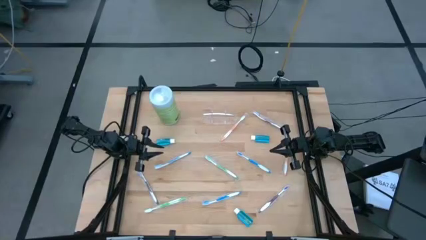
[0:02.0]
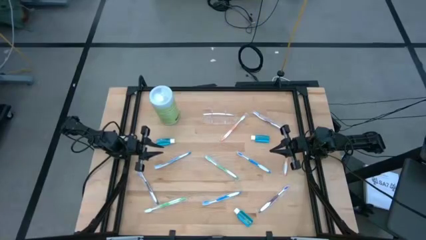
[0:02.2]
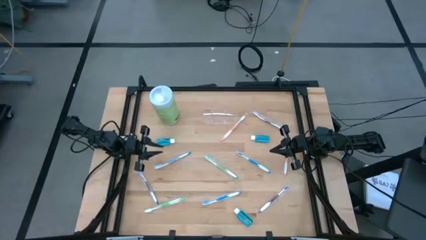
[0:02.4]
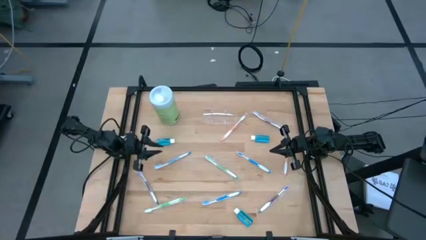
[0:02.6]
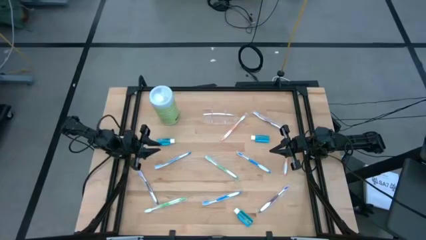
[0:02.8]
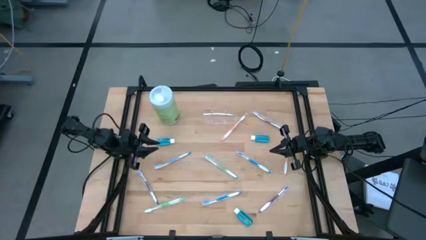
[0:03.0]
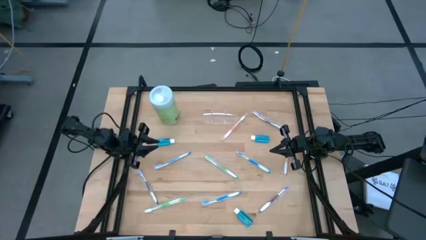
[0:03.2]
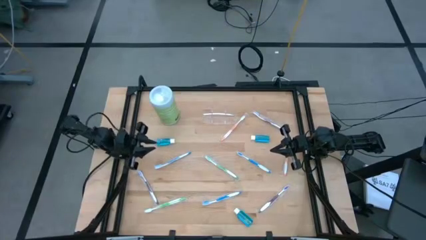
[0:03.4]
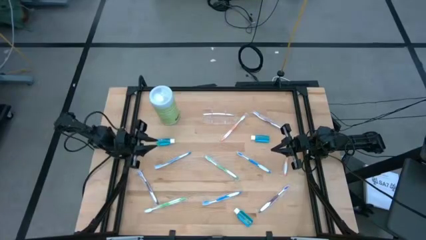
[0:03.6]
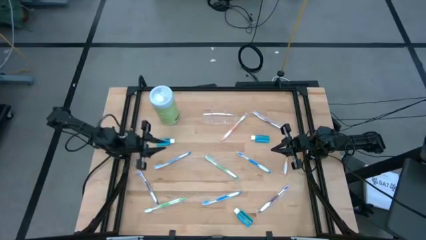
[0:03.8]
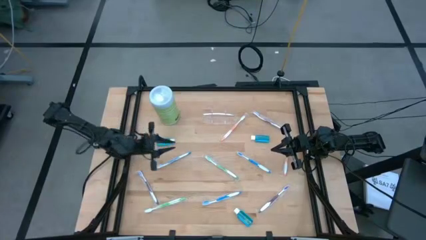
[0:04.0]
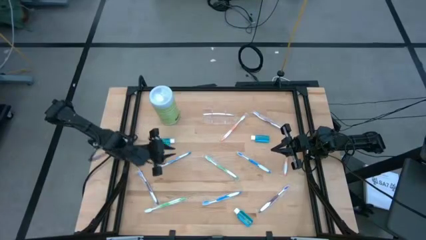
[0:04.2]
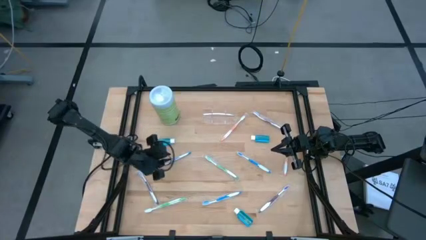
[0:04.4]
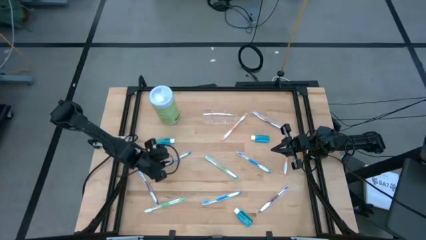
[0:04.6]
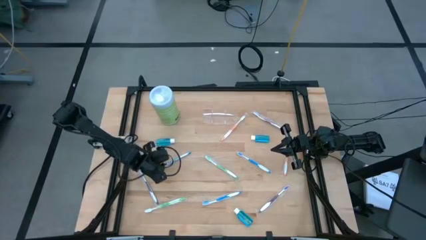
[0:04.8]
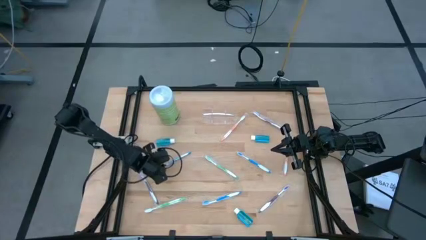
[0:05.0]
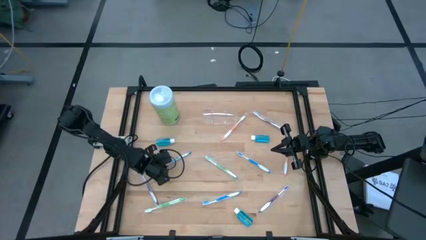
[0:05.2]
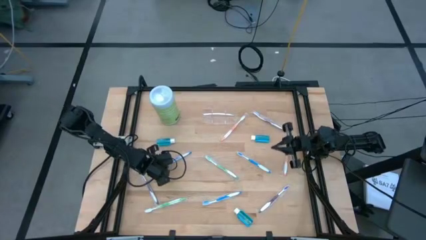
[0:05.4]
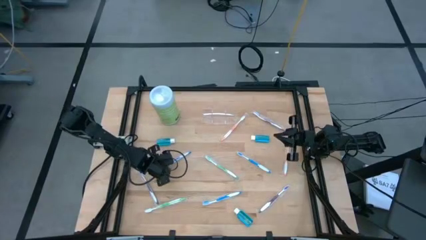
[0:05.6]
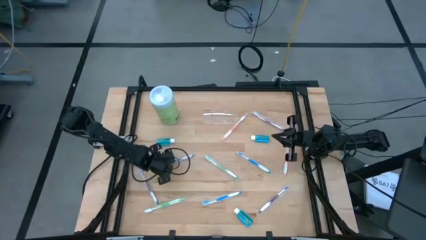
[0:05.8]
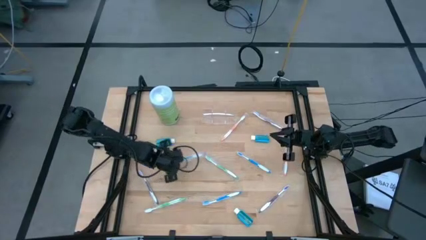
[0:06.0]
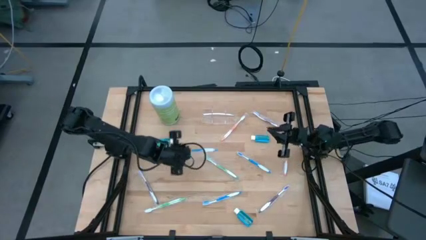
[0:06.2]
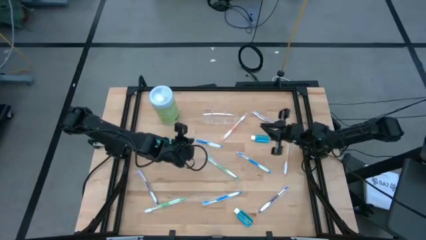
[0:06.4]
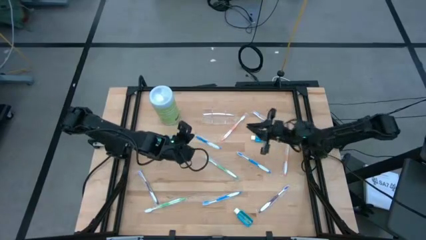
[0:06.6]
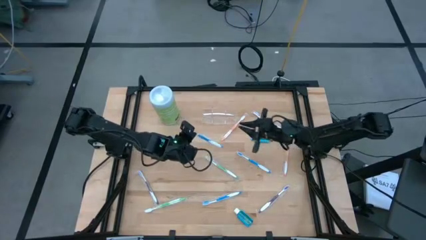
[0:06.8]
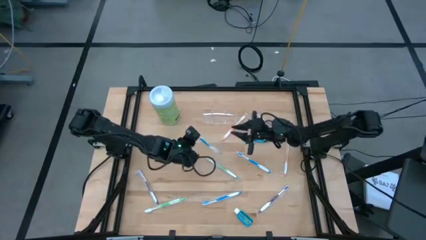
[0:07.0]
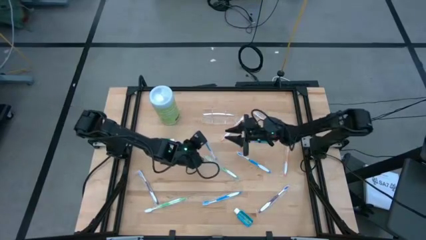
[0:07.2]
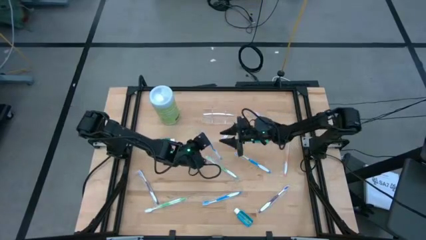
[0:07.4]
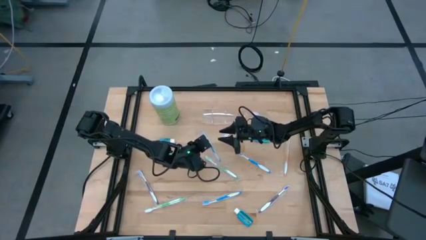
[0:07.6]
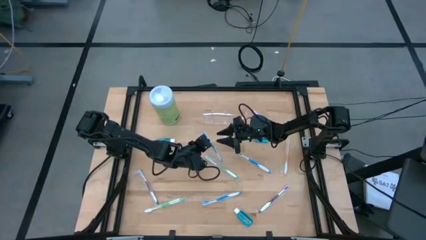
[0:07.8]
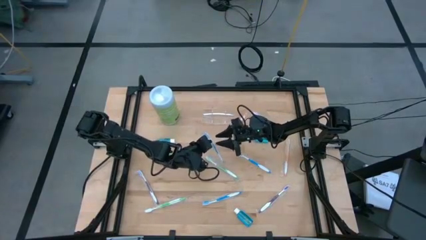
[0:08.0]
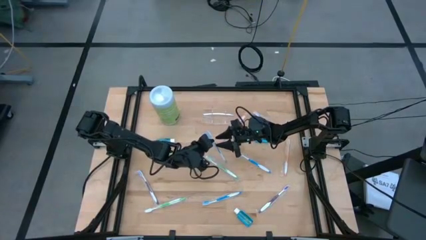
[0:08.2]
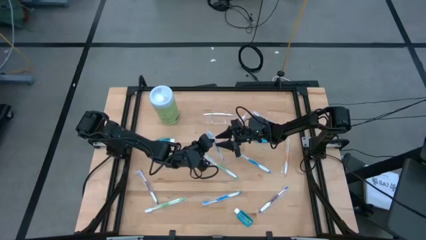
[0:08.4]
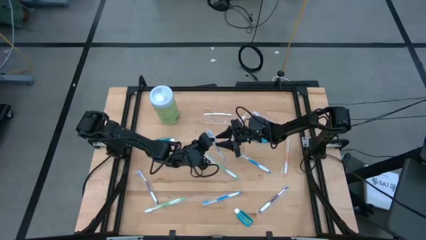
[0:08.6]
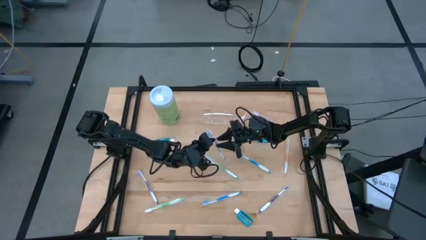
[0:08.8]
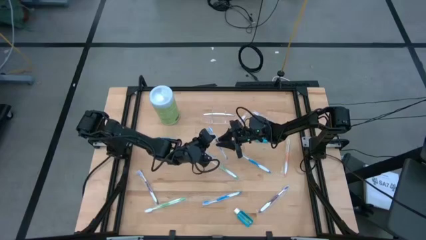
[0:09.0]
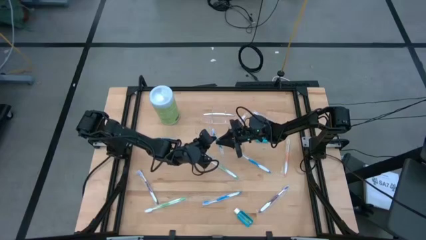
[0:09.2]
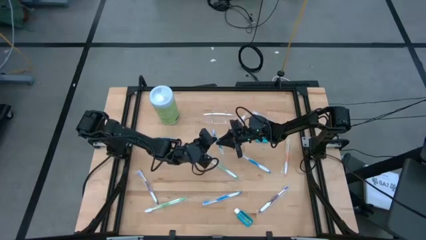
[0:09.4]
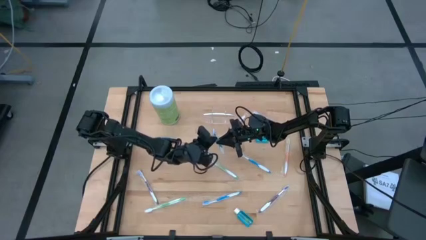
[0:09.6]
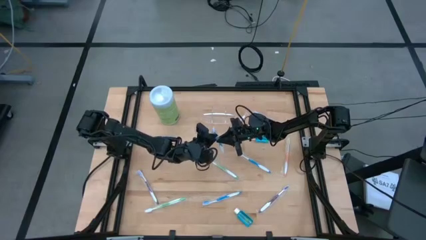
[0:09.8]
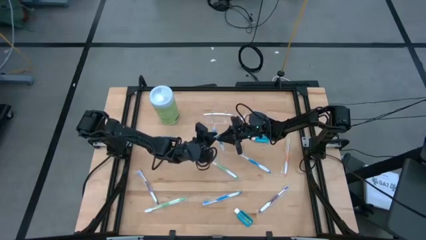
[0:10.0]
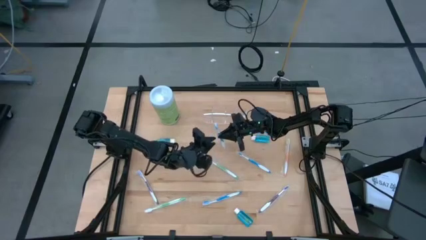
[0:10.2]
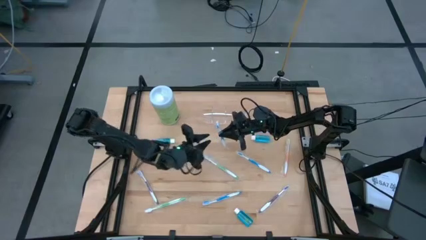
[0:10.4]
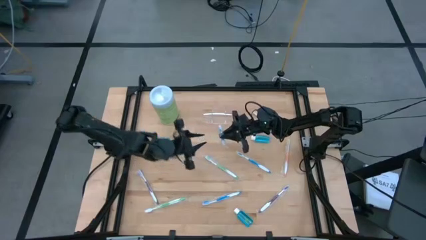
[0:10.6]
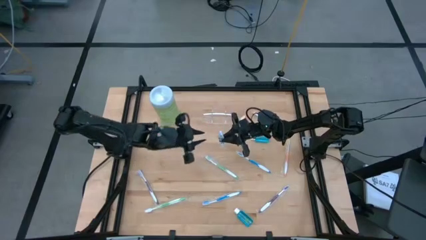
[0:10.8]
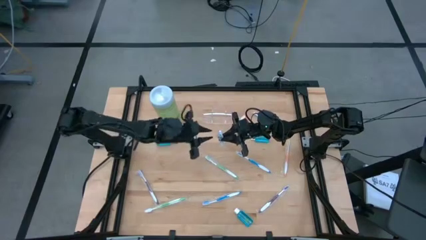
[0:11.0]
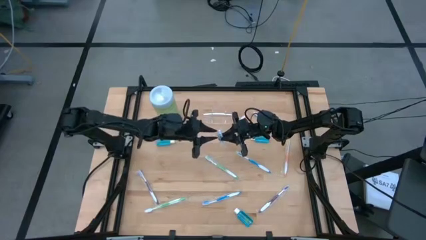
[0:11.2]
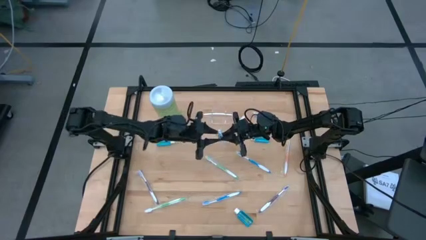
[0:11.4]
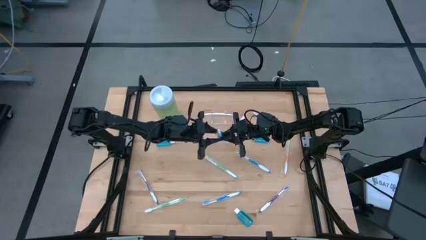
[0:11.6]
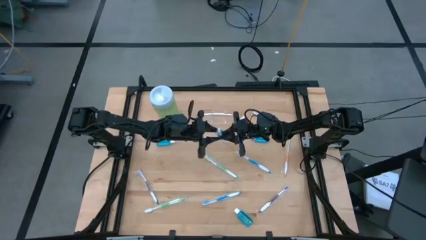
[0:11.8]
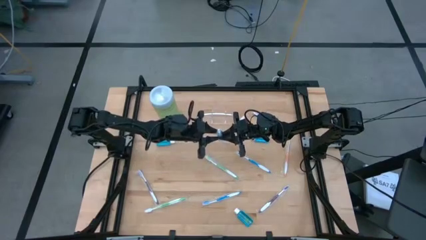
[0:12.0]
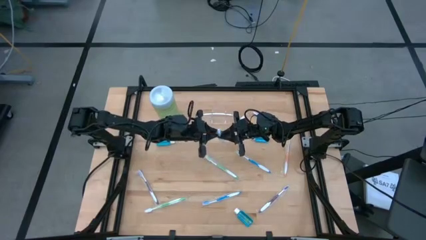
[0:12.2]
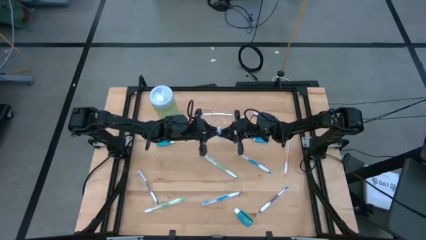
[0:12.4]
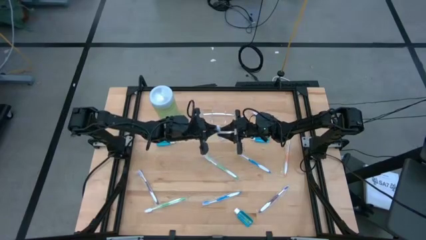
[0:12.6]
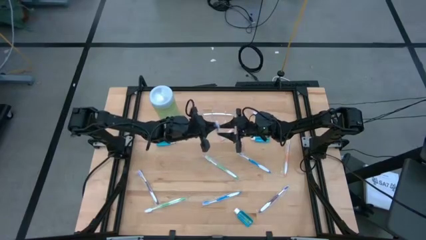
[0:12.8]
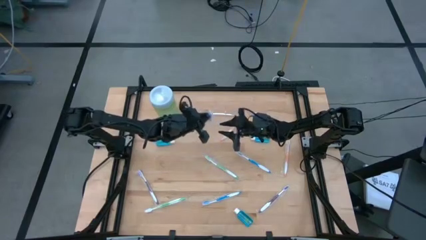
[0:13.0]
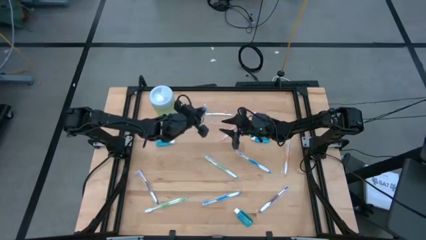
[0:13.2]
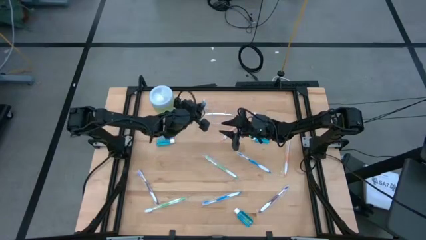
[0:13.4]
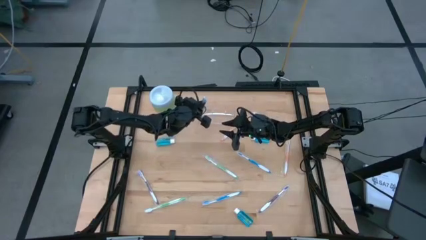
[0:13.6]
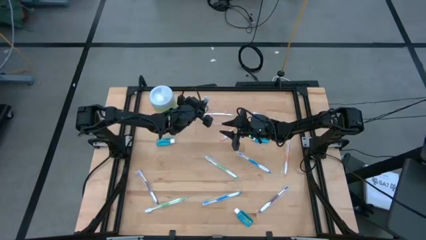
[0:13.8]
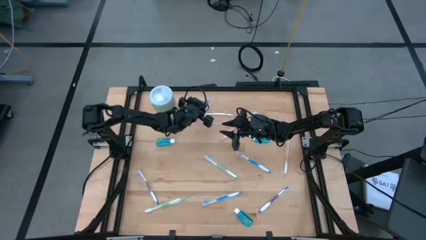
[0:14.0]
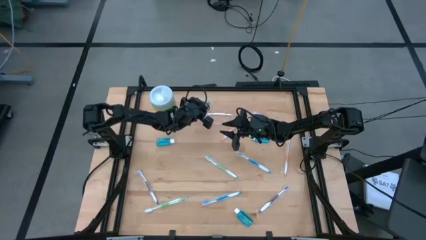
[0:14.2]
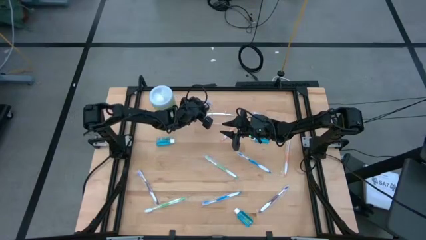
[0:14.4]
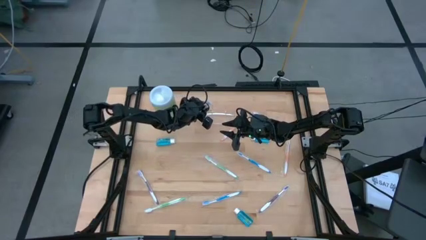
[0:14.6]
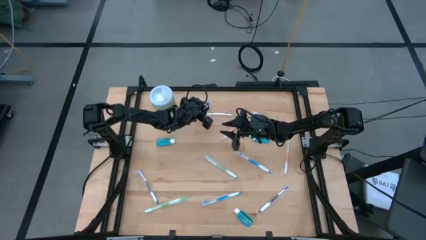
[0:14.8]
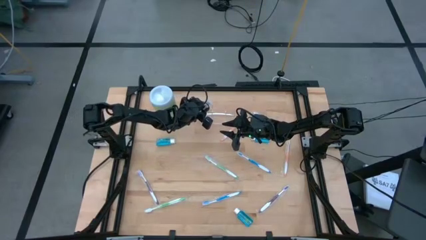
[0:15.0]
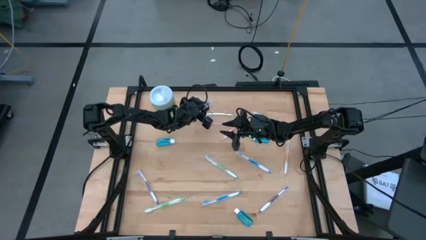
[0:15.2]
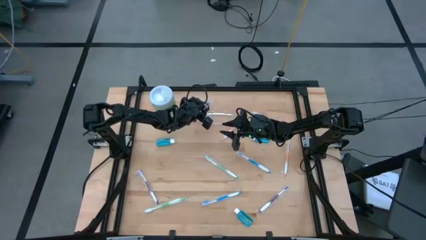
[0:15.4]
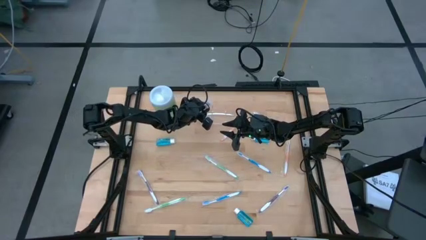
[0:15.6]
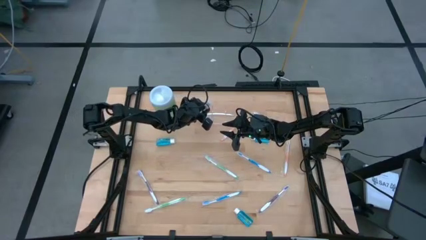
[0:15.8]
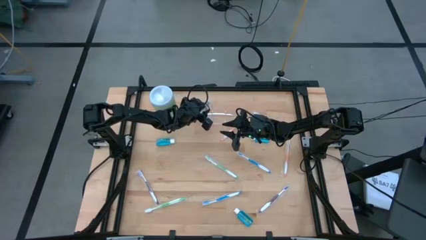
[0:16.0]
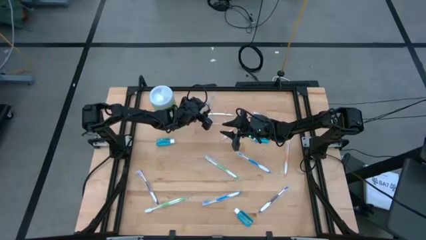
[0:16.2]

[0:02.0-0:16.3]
Task: Pick & Place toothbrushing station
Put the blue left toothbrush into the transparent organizer

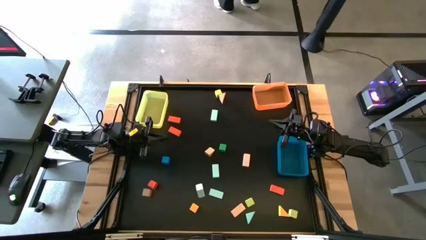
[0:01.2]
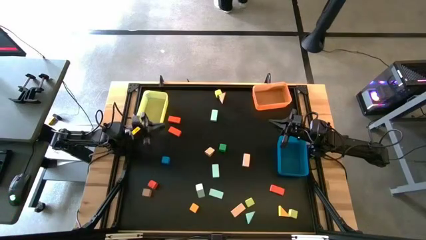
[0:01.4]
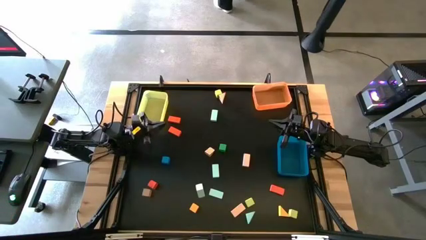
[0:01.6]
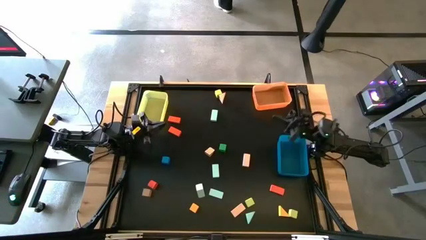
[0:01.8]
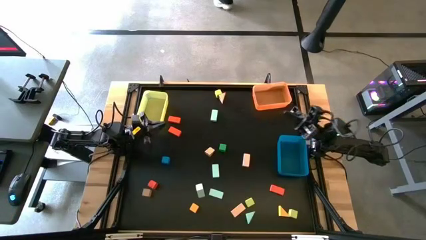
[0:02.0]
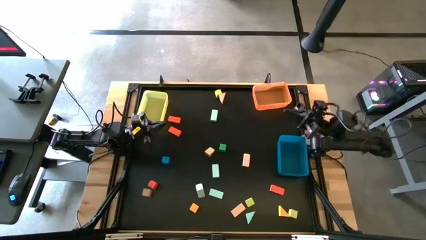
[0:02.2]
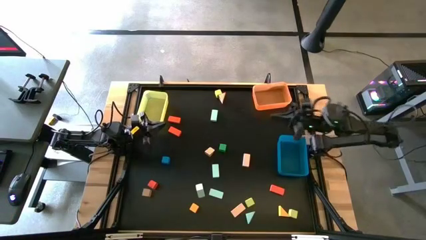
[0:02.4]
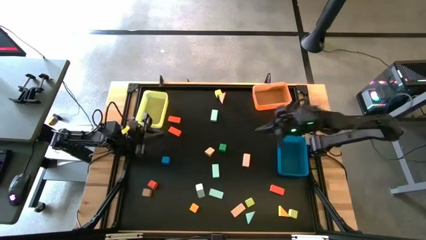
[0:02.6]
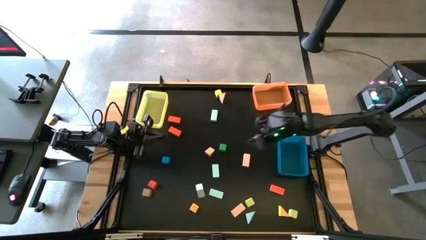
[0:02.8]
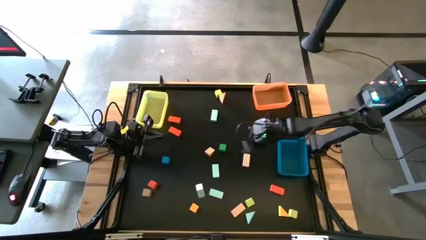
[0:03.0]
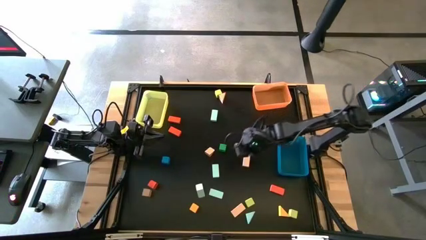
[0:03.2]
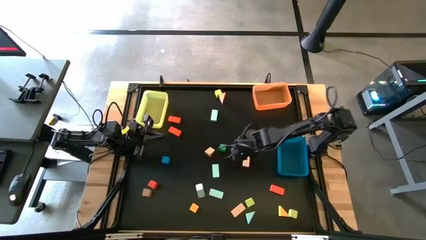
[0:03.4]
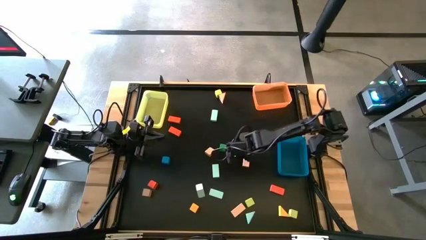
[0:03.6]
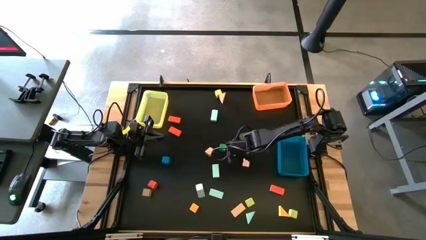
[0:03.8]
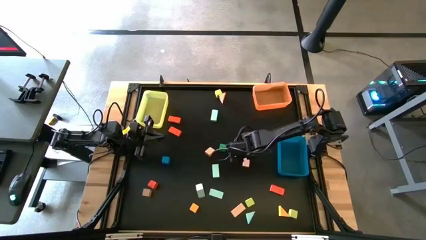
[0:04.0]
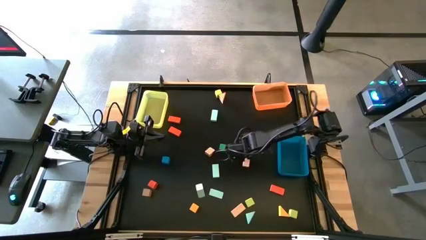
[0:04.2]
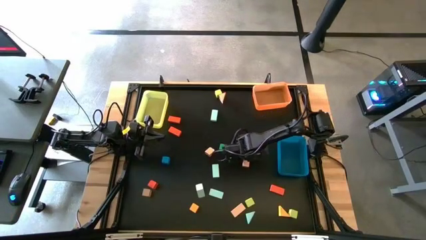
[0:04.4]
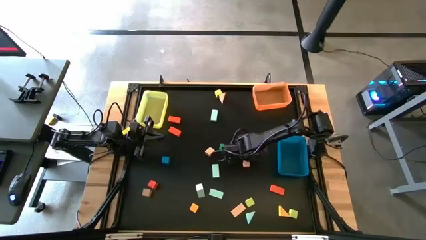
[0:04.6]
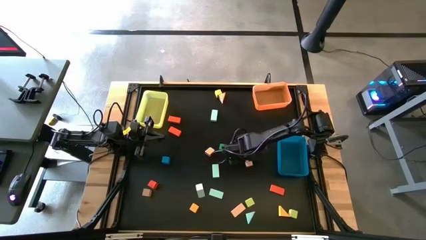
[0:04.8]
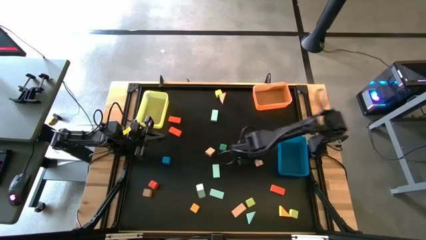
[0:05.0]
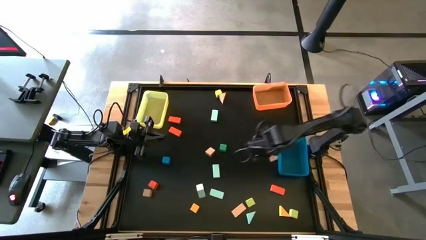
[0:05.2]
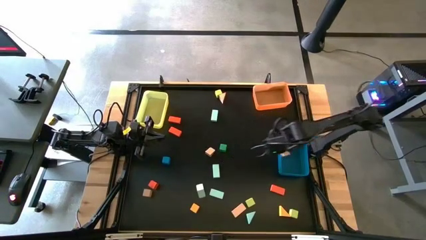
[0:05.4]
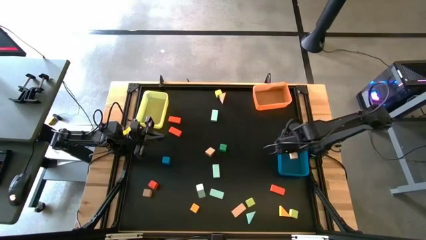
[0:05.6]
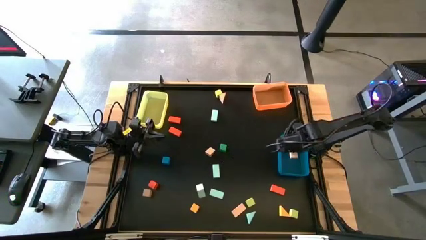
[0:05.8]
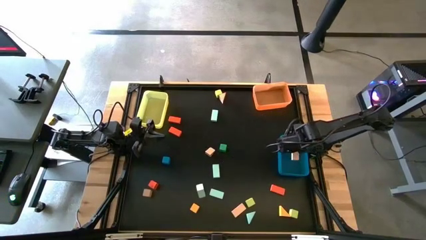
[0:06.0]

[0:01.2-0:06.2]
Task: Sort blocks by size
Put the pink rectangle block into the blue bin
